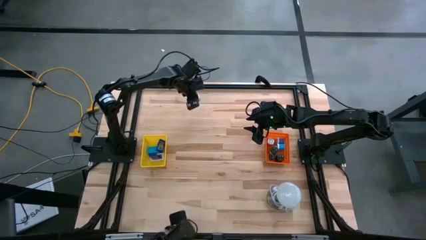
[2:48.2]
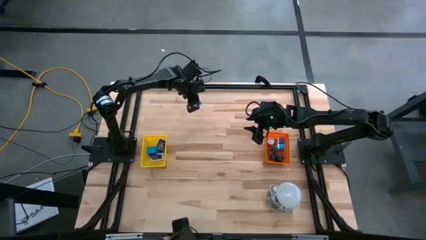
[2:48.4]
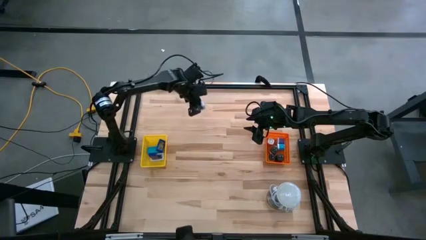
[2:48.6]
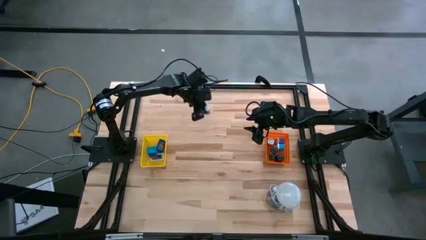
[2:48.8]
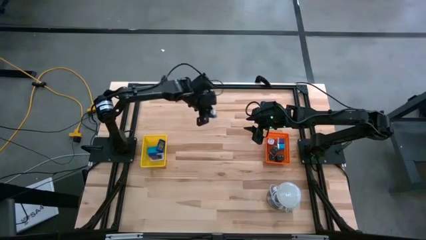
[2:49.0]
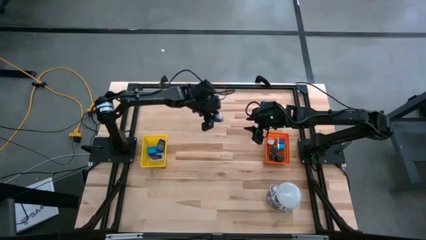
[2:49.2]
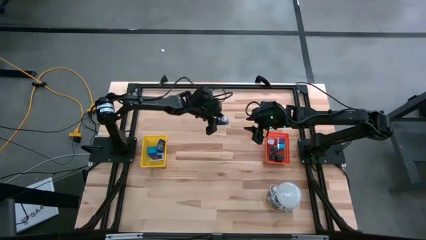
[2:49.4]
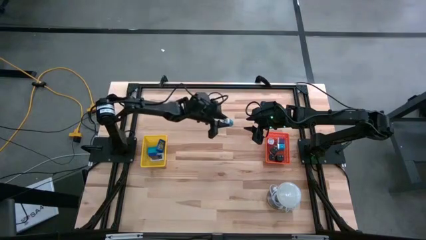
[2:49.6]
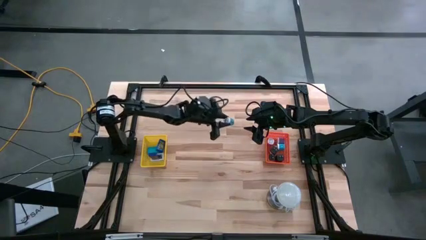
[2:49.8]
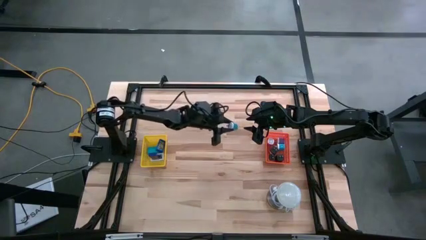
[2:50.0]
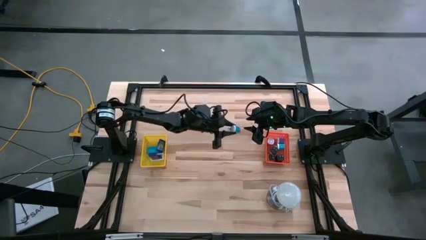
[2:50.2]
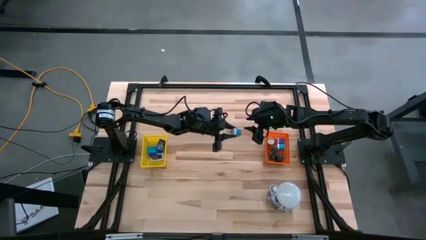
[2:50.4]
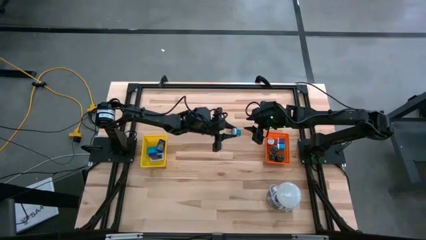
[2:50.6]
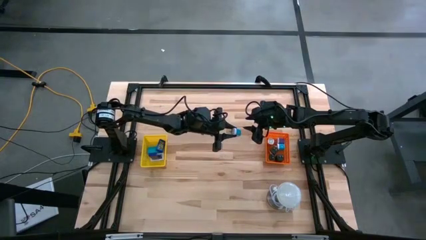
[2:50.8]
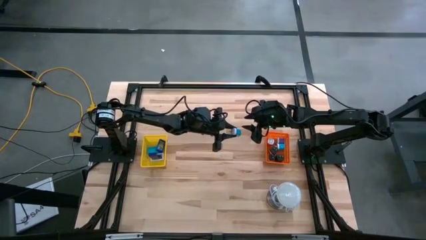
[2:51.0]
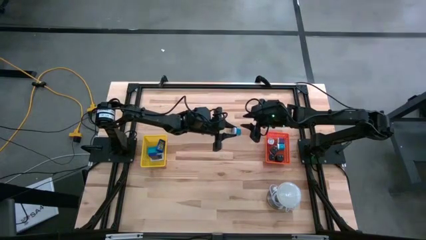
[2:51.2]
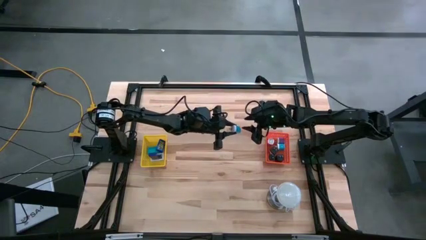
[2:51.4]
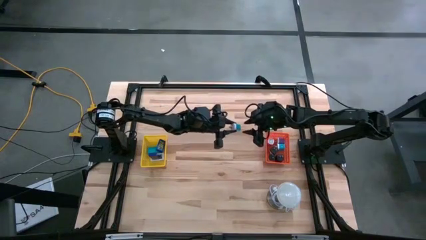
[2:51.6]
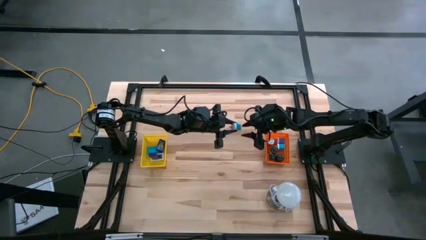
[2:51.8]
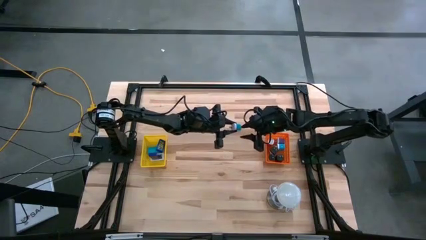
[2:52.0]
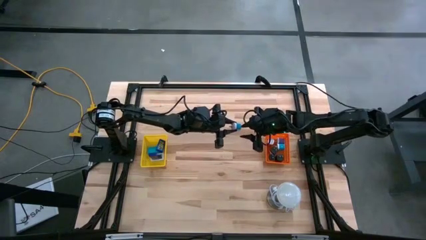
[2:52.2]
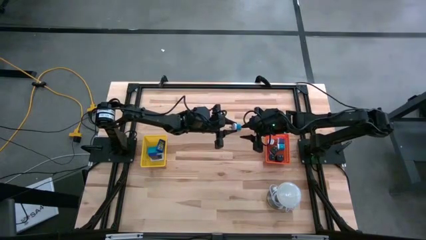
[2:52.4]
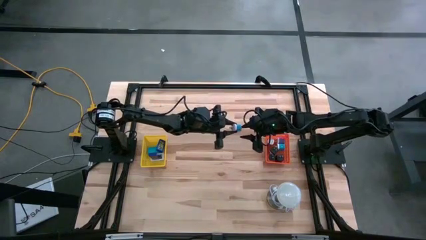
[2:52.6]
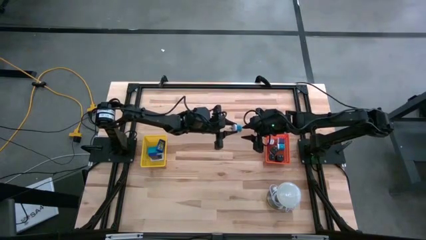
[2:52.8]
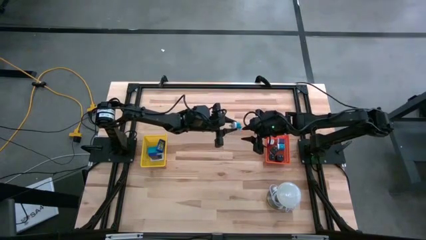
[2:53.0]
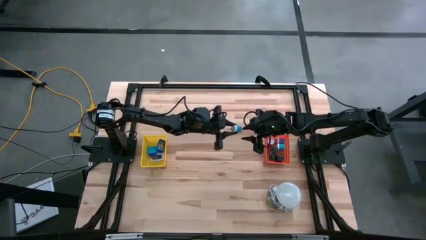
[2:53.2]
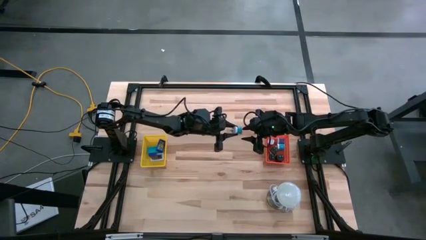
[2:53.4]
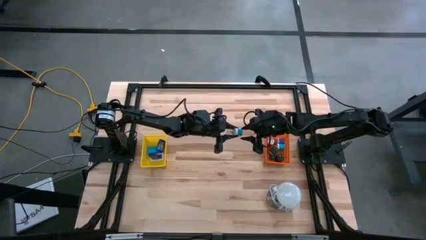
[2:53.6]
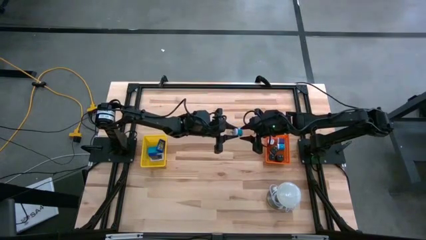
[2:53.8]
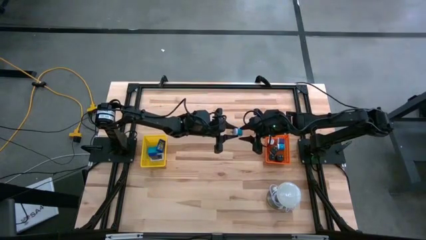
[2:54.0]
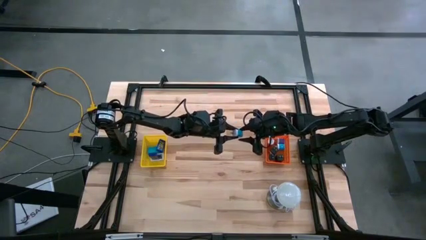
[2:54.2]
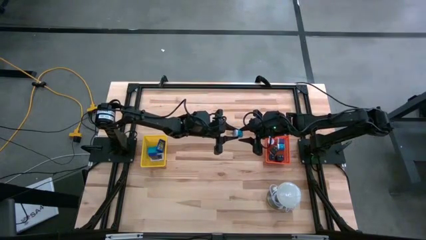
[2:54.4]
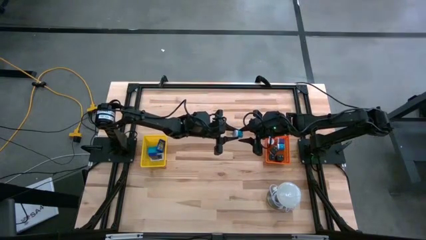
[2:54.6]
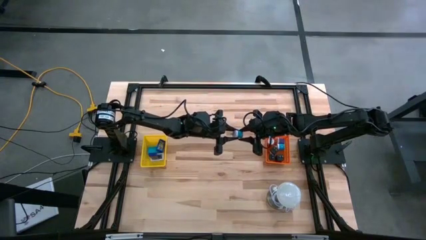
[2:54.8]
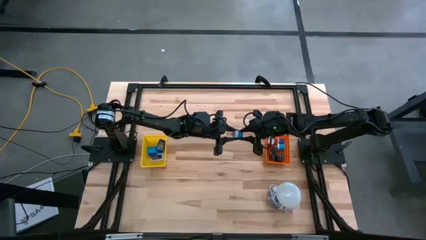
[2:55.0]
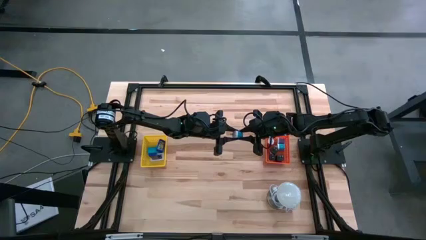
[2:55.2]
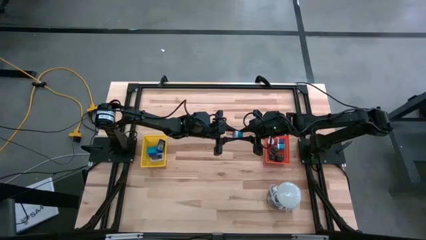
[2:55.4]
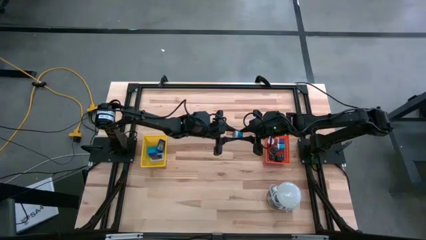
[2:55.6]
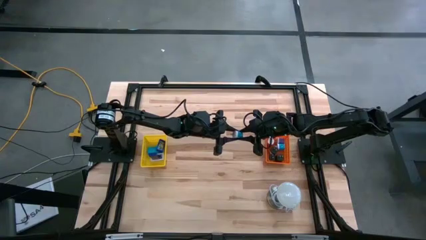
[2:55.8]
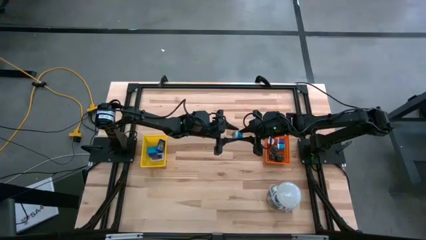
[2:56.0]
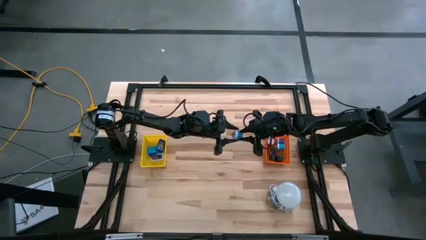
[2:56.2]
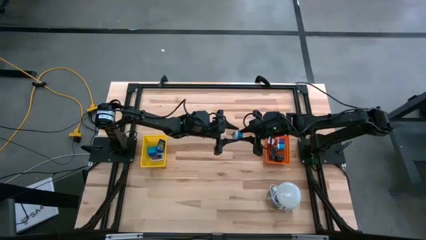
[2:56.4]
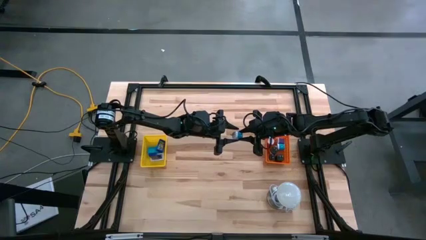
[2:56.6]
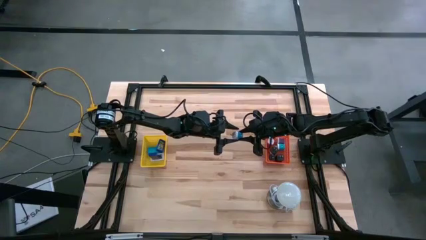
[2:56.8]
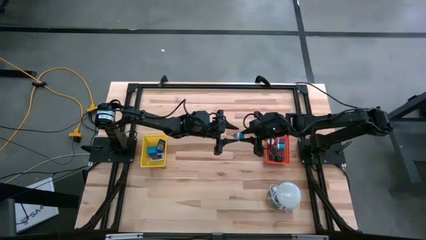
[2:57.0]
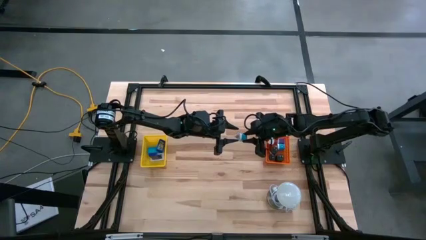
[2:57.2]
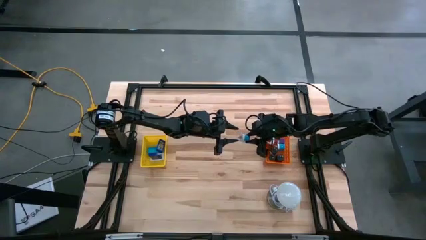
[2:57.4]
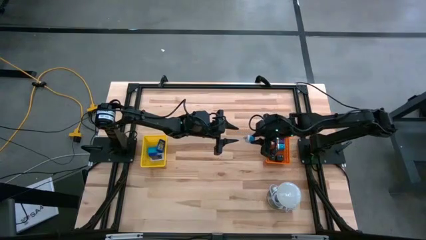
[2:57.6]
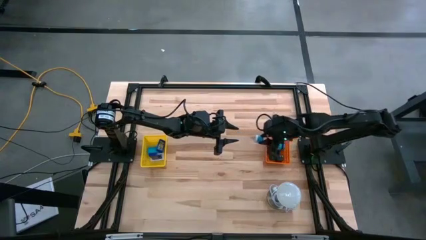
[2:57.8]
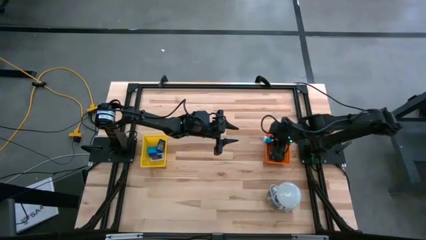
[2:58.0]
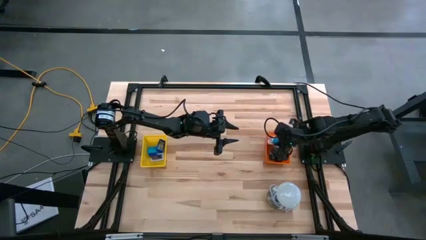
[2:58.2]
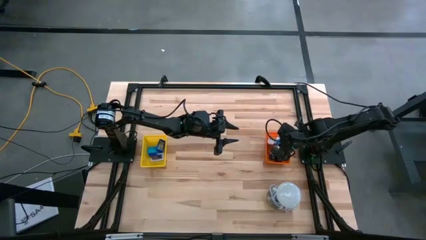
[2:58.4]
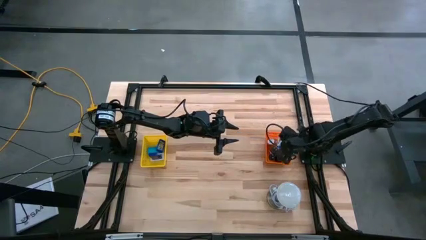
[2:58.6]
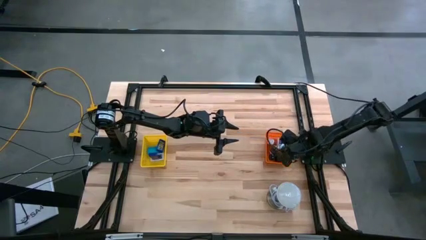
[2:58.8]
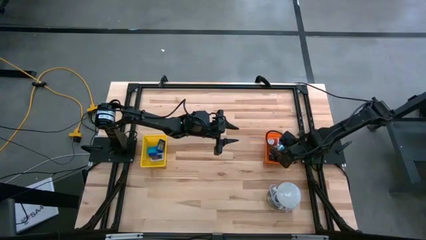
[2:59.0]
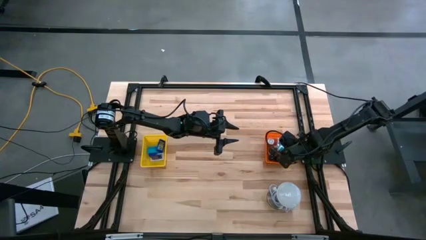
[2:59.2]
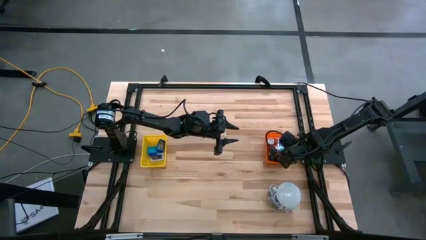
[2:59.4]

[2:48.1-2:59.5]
Task: Pick & Place Office items
Put the blue white charger adapter into the orange bin
